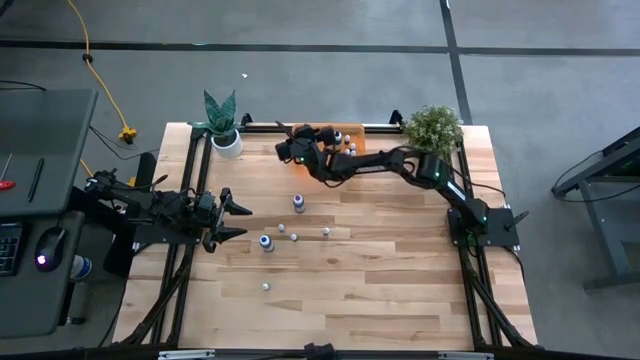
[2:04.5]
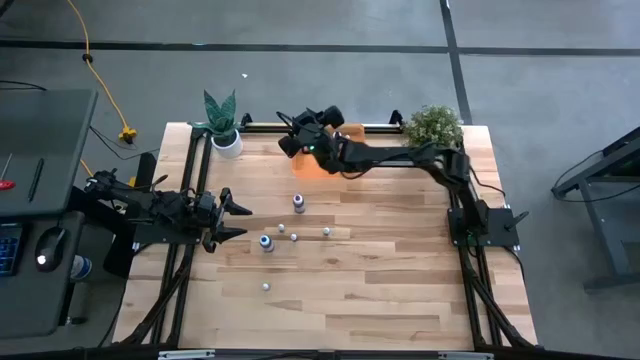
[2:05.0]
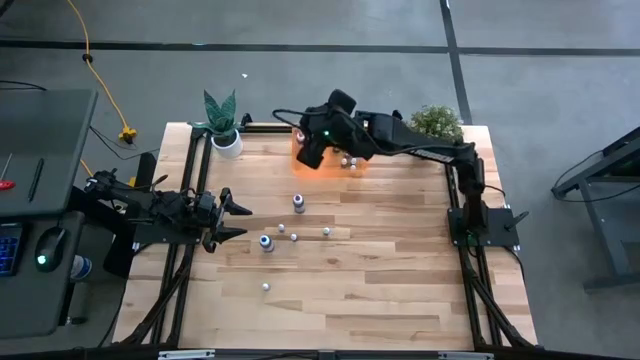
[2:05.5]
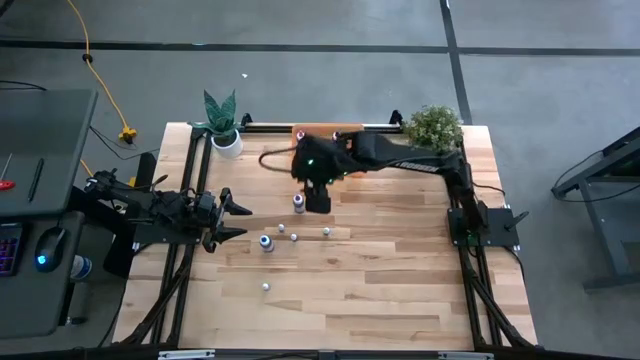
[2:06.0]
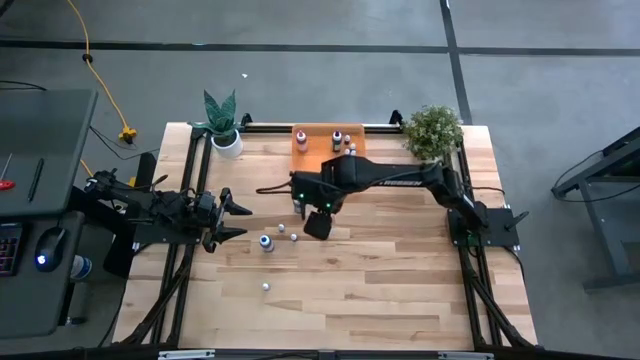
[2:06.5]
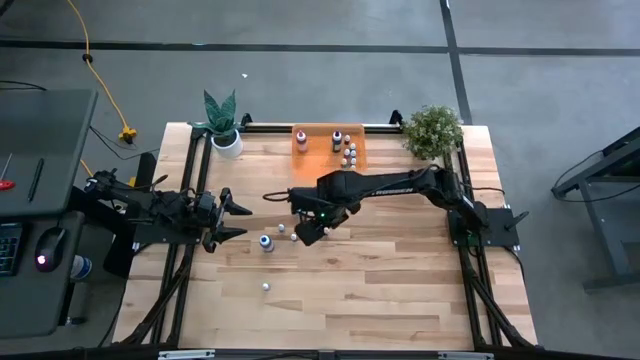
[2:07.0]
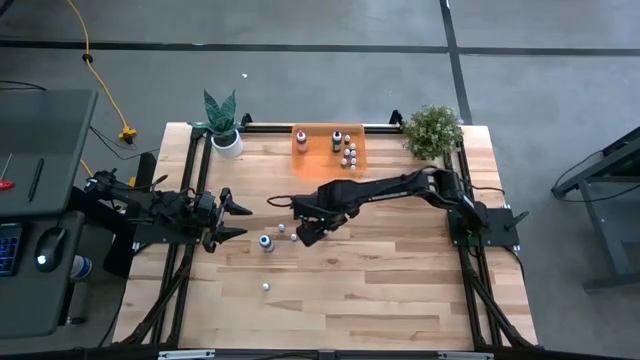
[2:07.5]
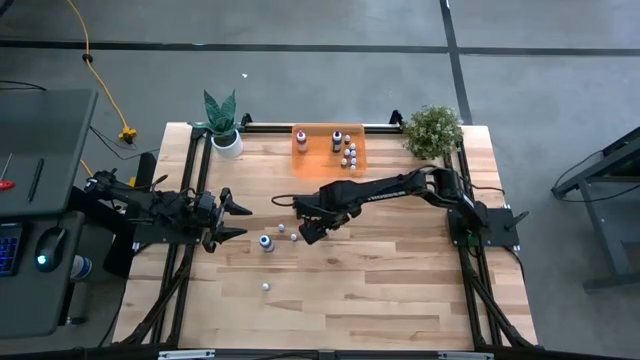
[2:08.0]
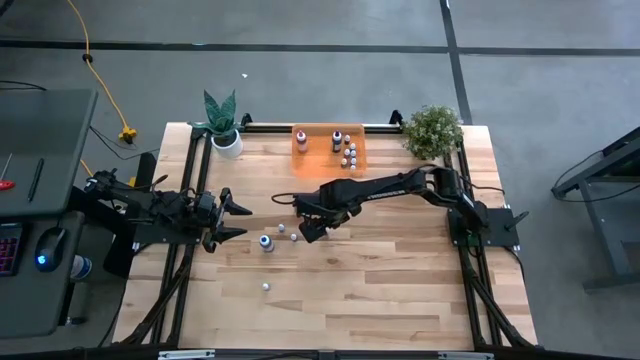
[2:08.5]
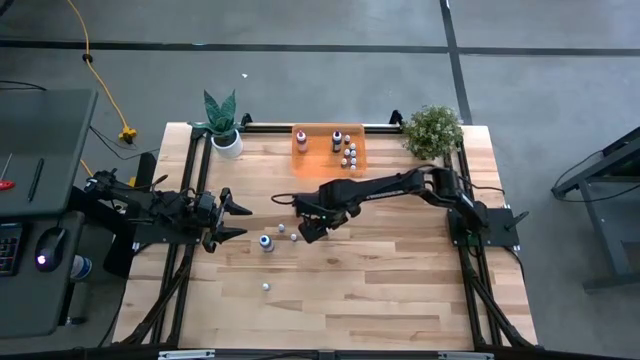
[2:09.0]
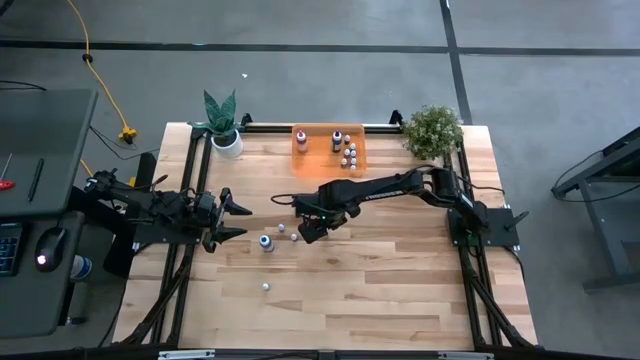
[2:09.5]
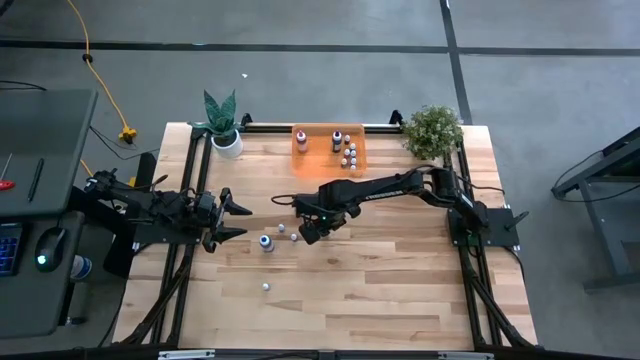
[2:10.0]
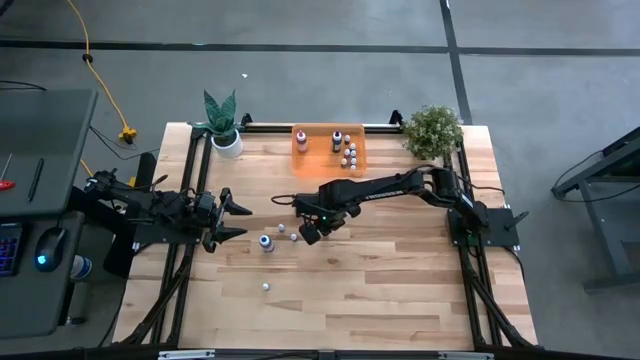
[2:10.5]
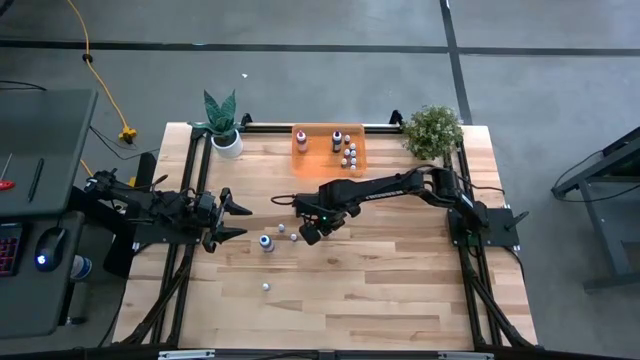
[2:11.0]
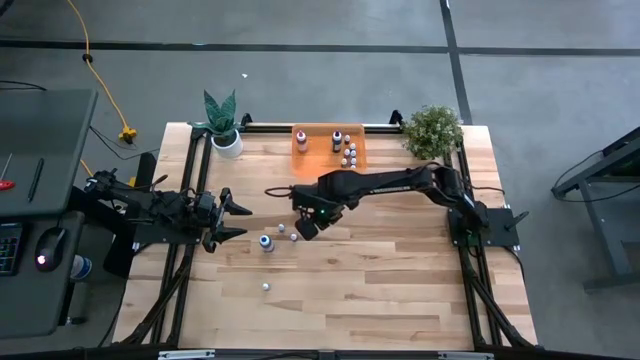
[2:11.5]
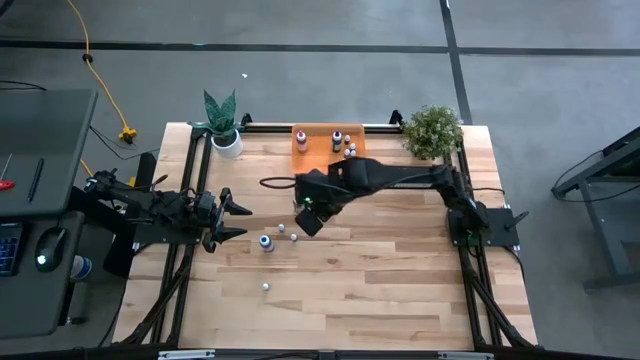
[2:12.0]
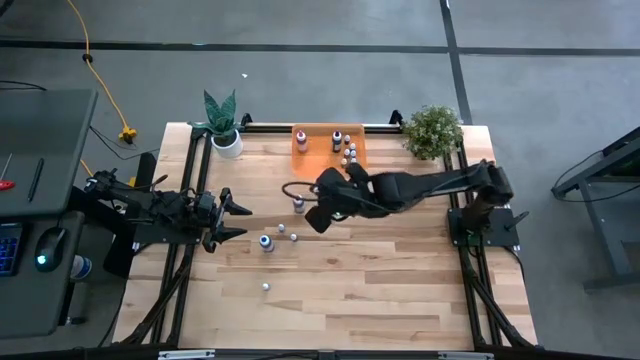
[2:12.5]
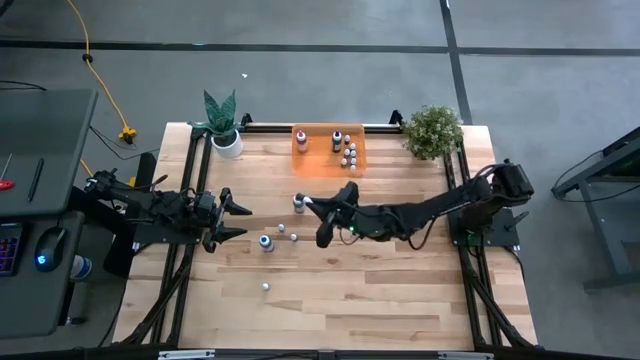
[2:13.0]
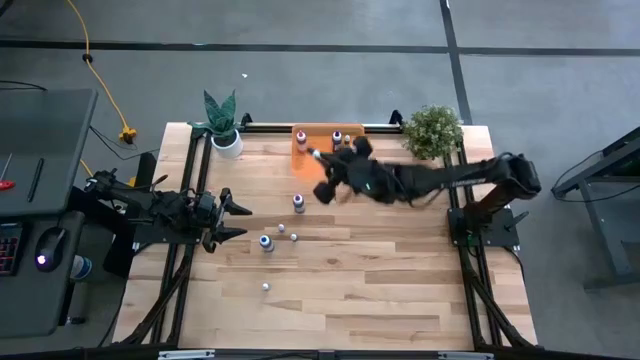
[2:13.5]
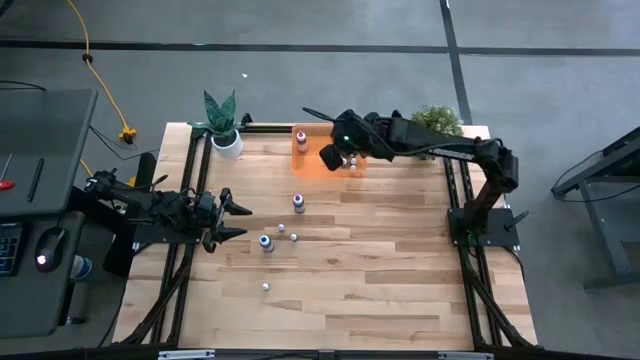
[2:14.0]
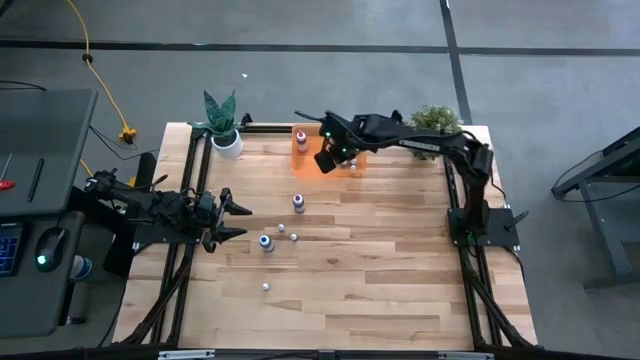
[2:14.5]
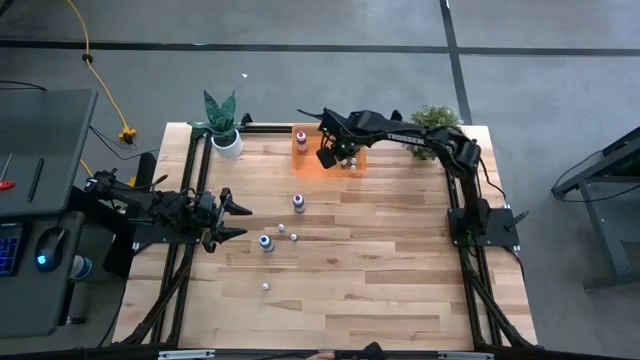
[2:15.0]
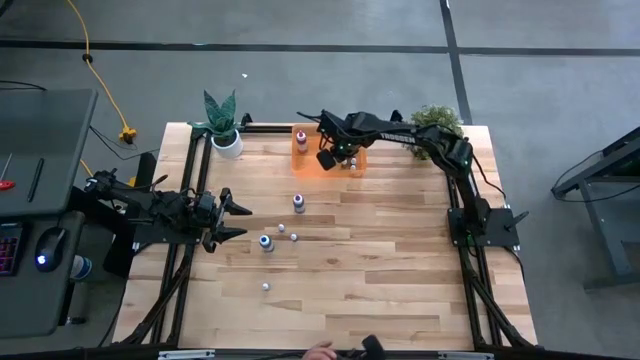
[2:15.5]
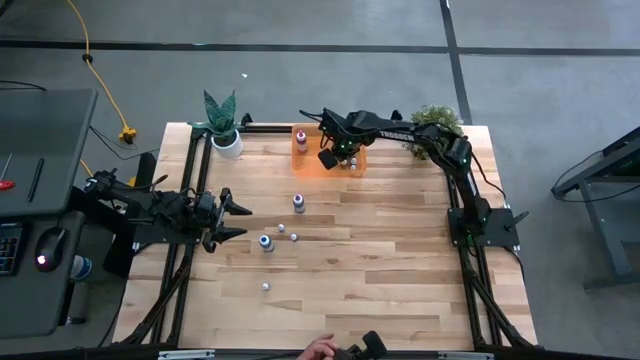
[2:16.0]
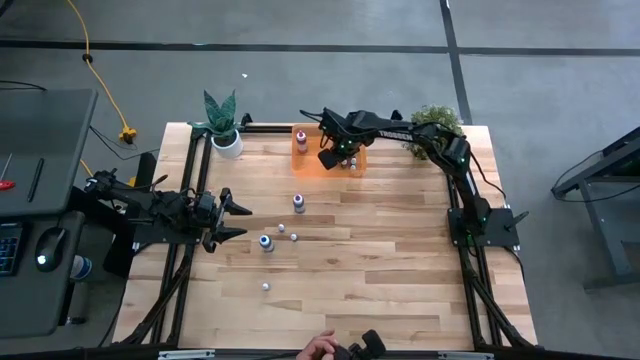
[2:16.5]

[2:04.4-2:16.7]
Task: Pick & Place food coloring
Put the small black food coloring bottle into the orange bin

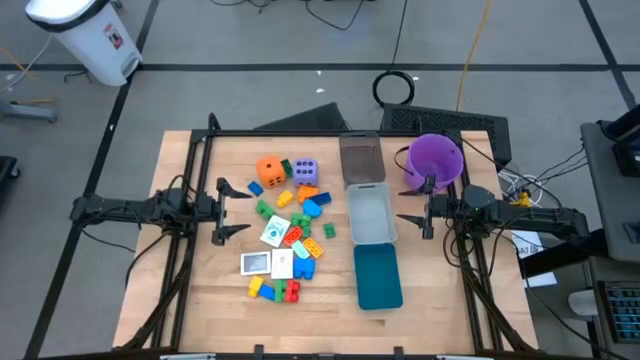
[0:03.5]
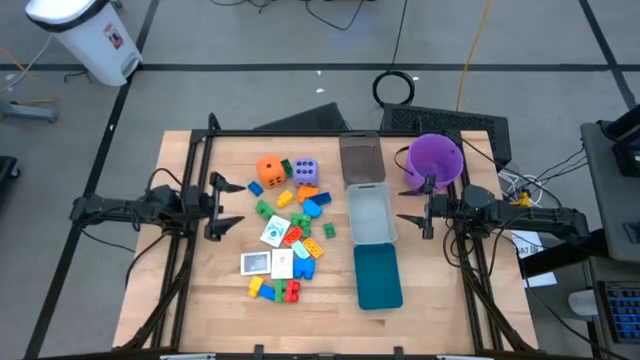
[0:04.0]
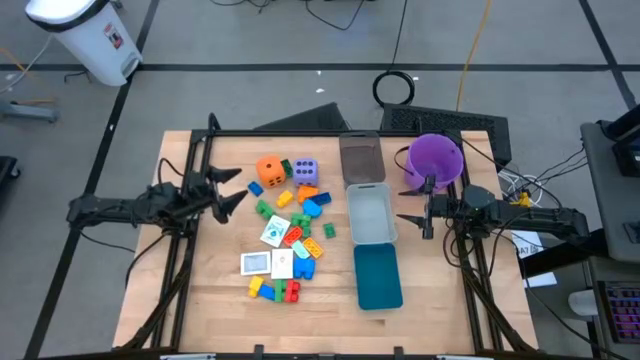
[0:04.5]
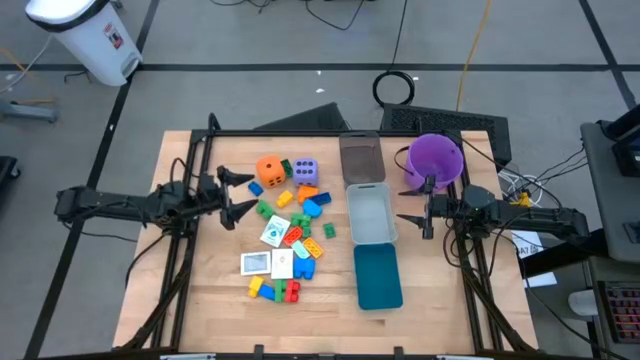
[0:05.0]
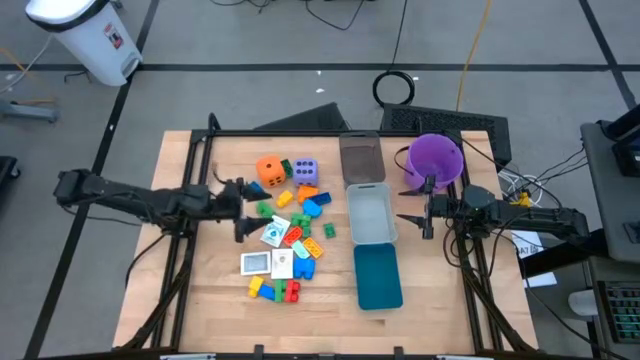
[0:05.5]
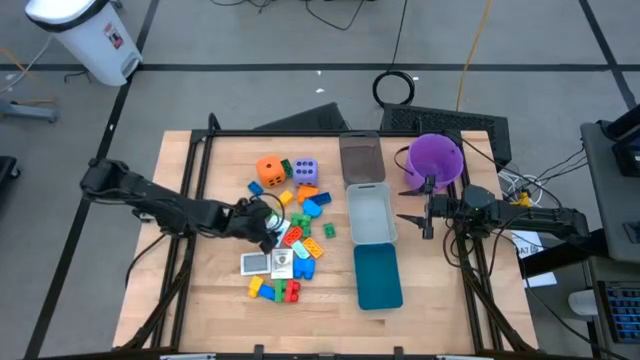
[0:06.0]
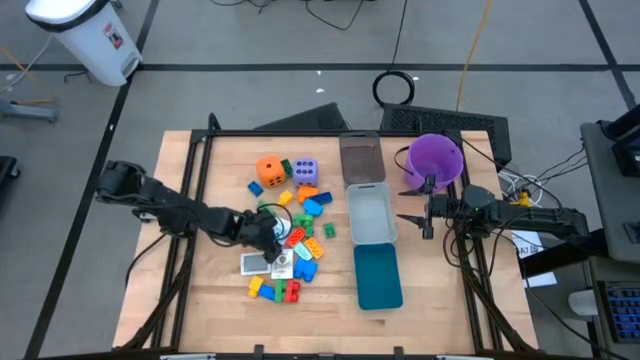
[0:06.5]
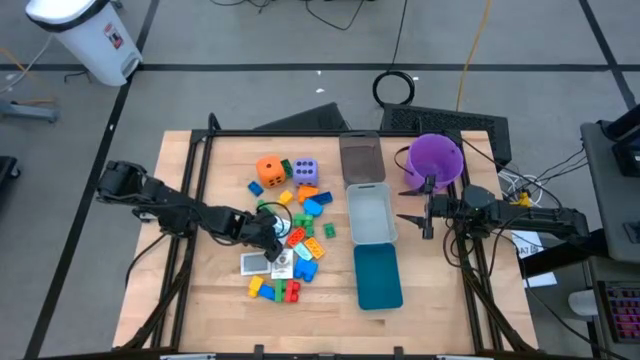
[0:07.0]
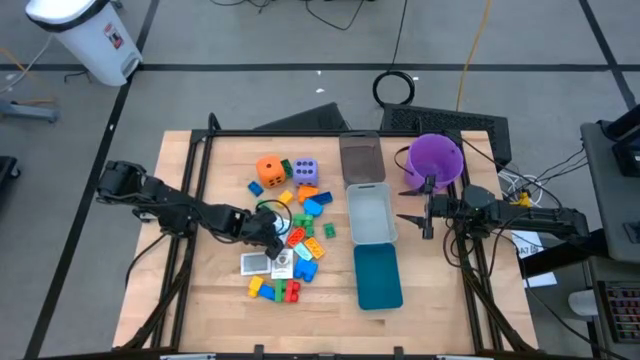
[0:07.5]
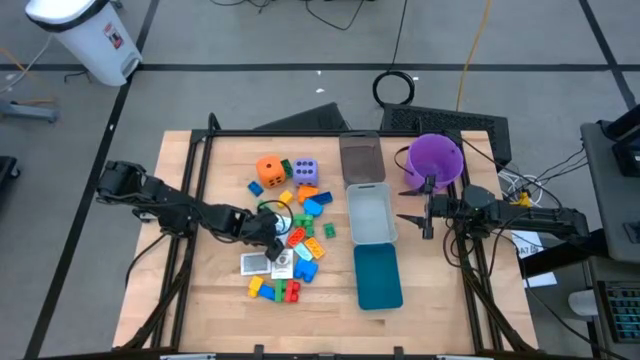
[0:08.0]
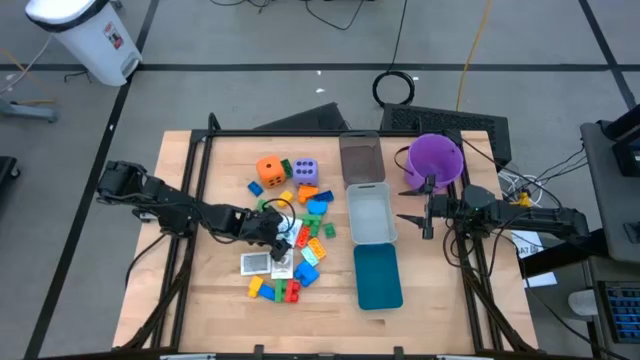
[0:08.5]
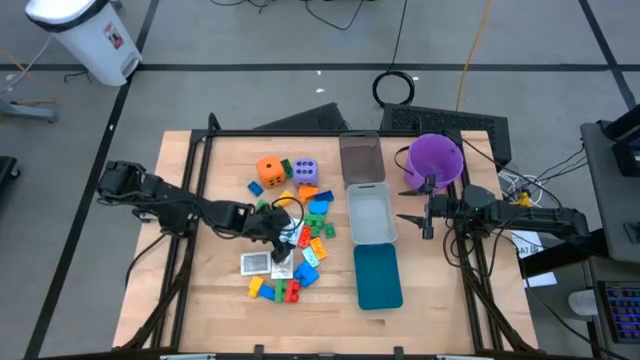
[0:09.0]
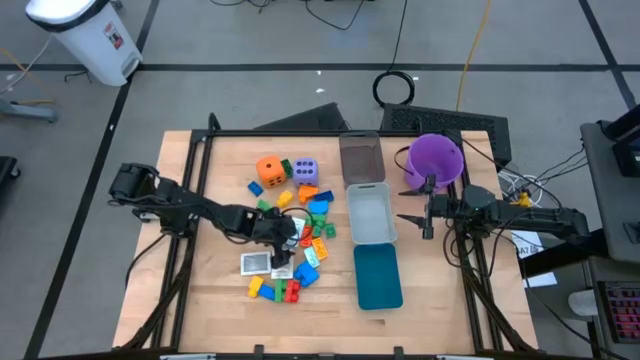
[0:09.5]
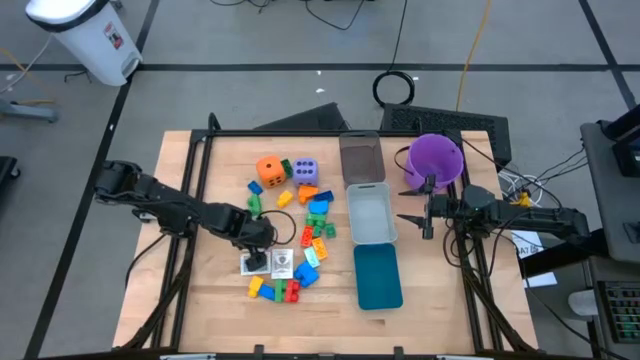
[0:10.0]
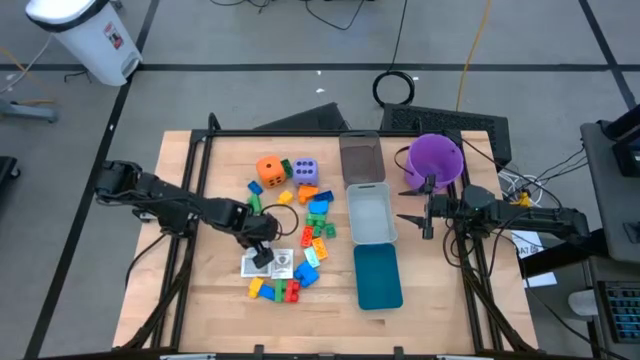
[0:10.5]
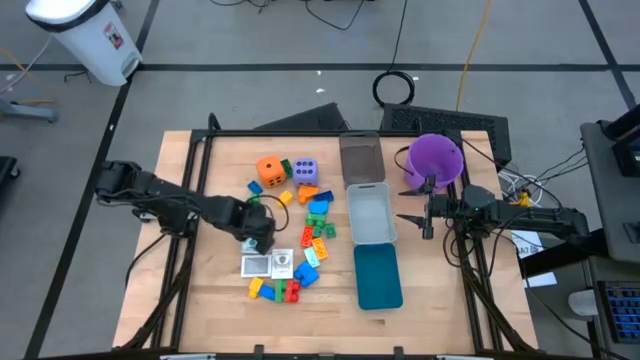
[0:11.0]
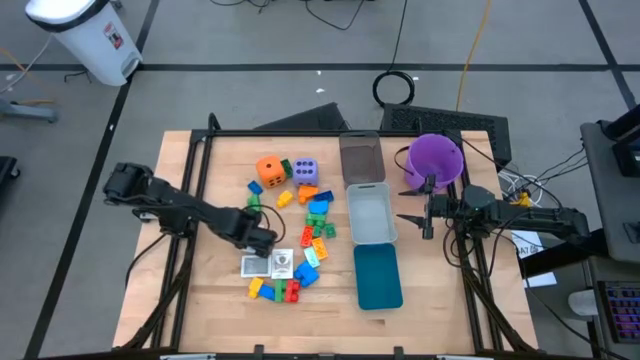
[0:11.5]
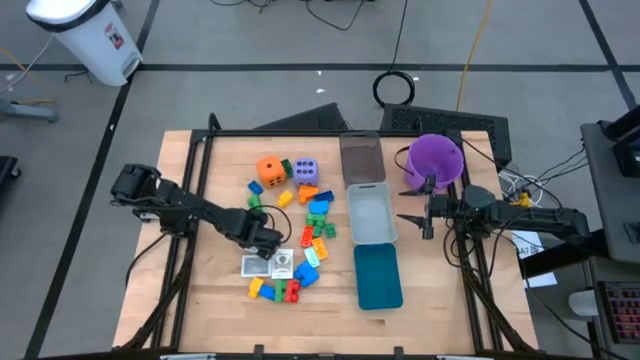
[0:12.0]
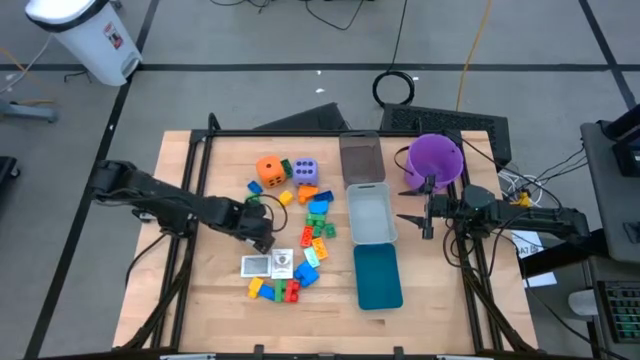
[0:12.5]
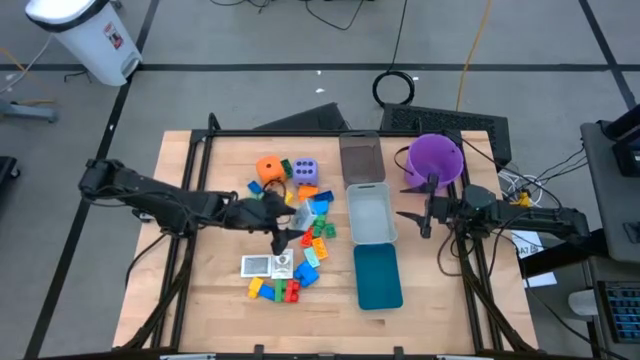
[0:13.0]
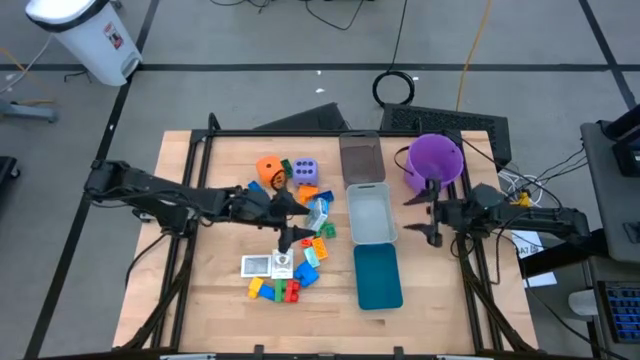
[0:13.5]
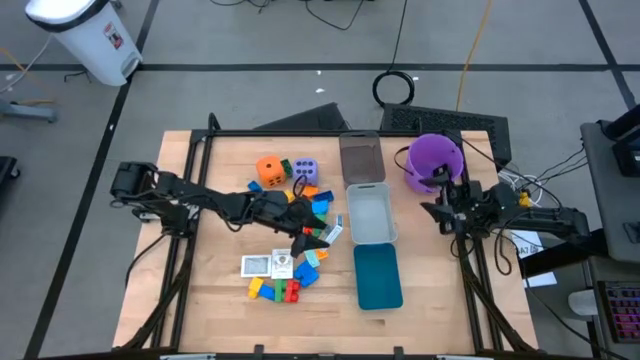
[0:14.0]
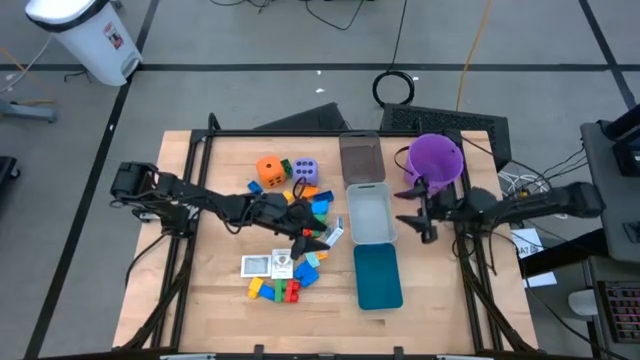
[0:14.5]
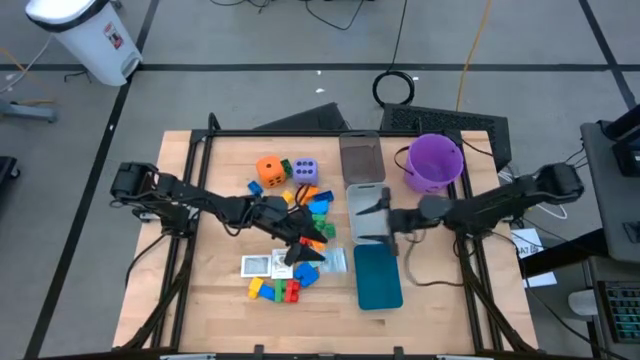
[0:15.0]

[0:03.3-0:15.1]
Task: Pick & Place Toys
Put the blue deck of cards into the blue bin
